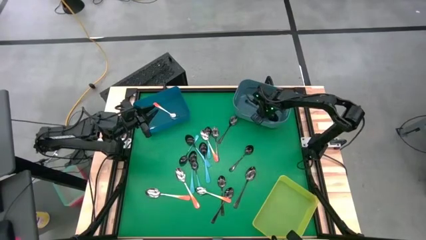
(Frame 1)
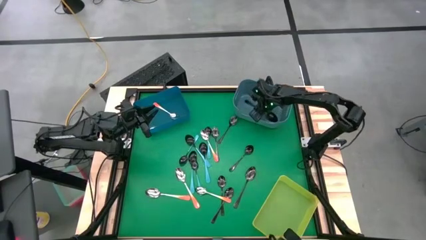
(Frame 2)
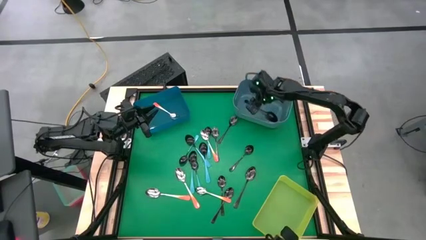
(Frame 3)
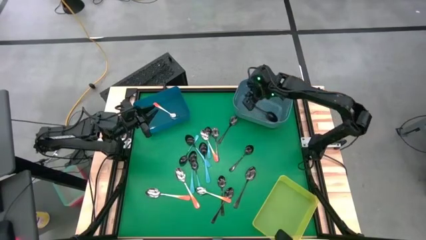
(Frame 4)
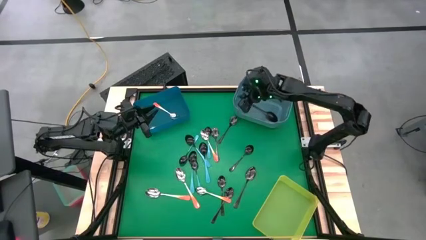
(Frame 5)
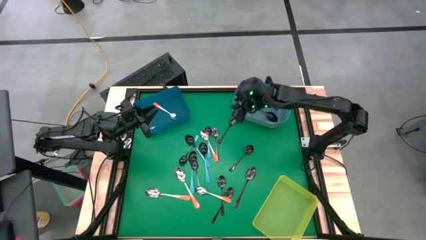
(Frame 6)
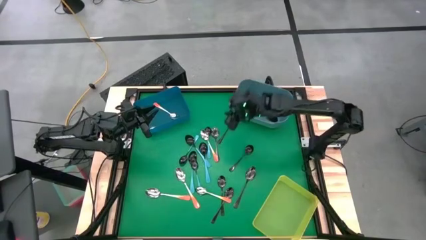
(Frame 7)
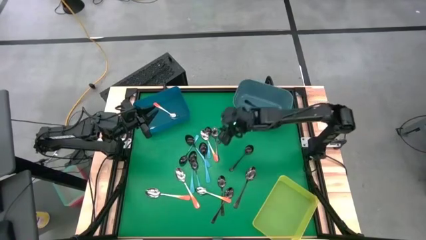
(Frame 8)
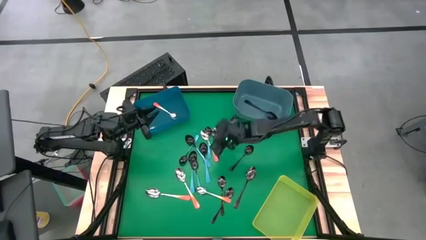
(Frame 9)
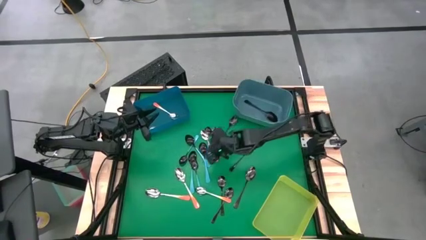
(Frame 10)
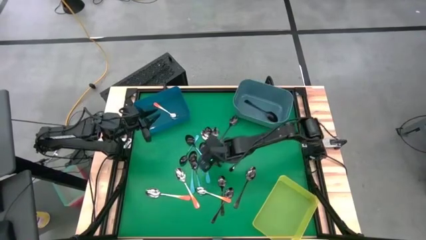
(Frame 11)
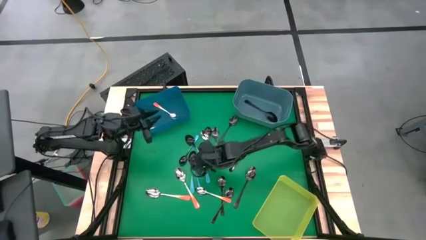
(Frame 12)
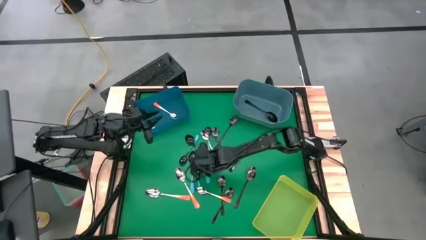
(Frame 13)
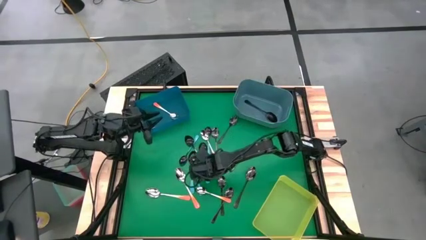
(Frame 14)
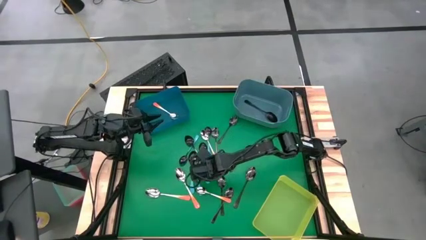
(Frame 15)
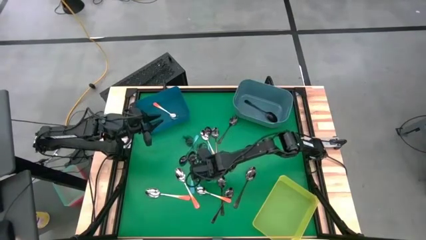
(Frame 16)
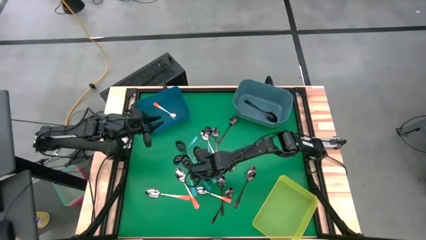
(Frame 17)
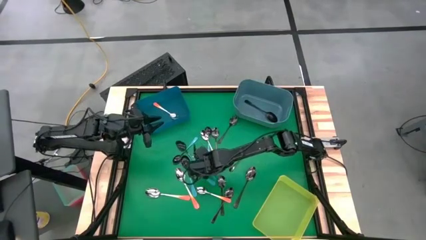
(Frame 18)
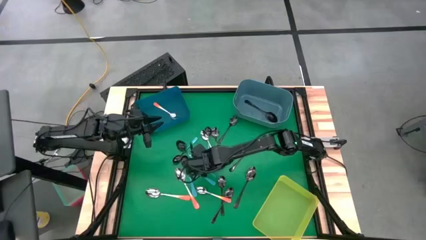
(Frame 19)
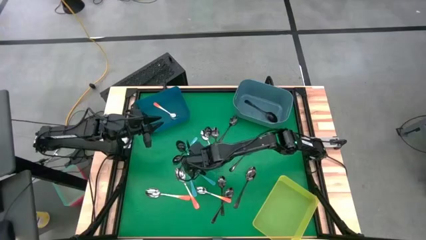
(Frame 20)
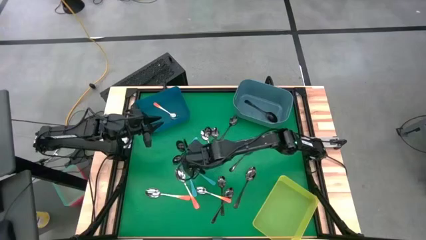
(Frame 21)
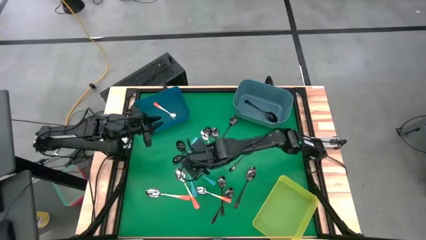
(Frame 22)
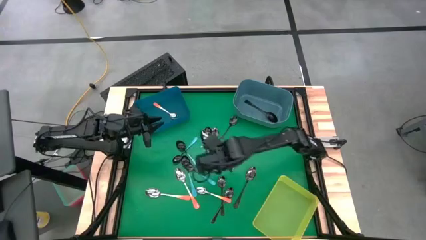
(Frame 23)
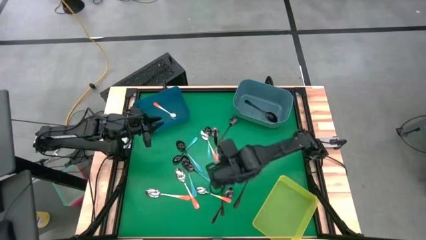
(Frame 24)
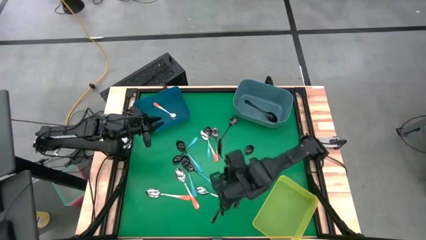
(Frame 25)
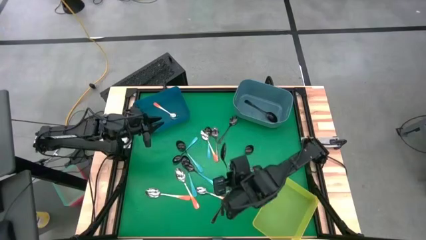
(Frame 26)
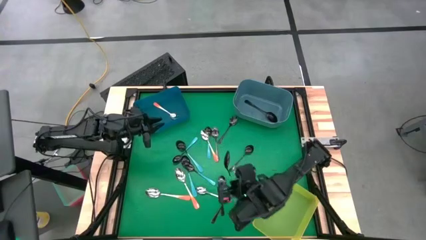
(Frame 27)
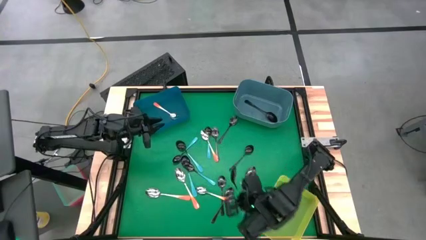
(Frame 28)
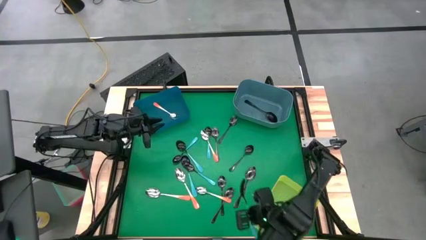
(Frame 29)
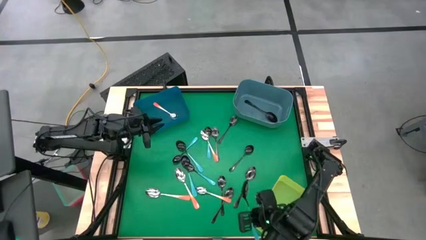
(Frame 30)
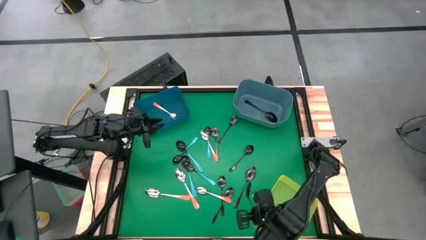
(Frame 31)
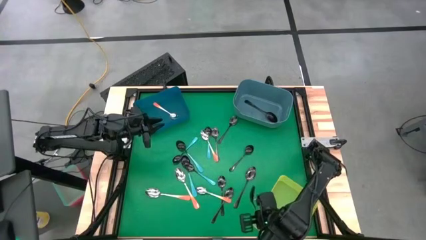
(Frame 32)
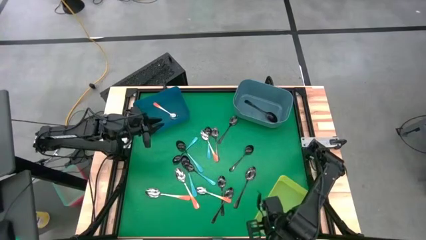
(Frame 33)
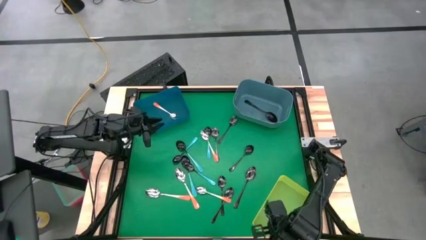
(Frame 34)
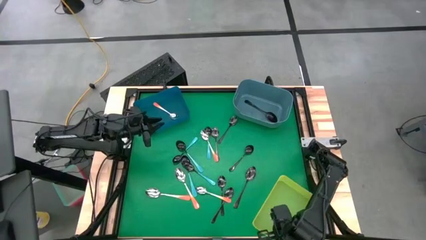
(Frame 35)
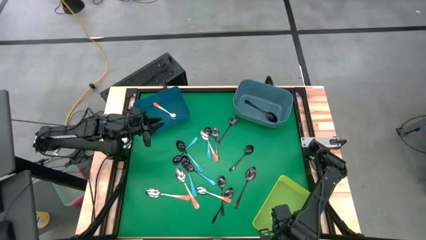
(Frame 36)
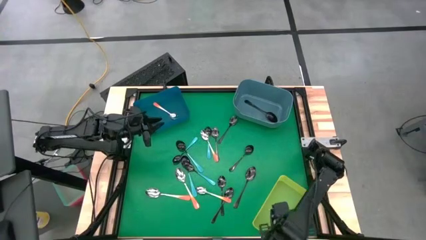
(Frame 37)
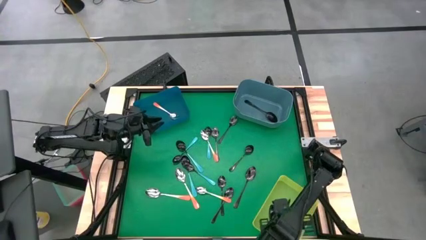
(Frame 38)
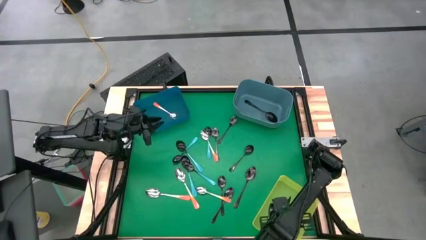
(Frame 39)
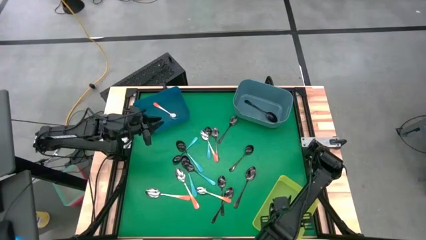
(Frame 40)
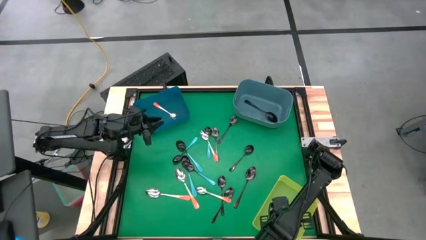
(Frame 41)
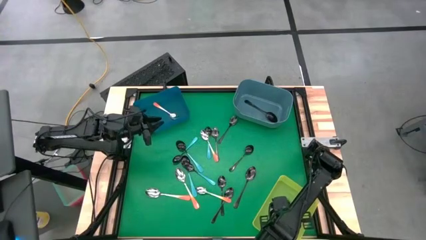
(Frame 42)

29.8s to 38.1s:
Task: Sort silverware by color (type)
Put the blue spoon into the yellow bin

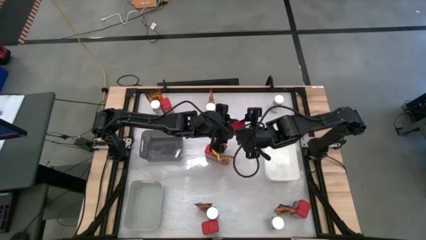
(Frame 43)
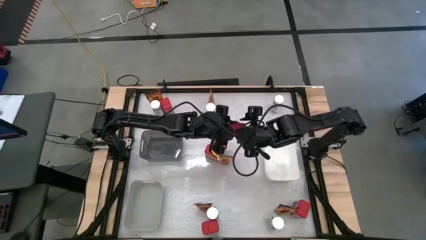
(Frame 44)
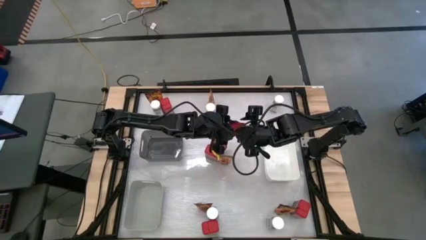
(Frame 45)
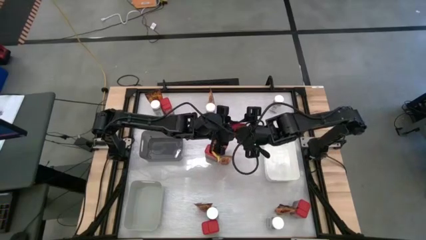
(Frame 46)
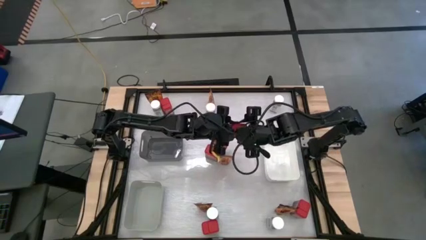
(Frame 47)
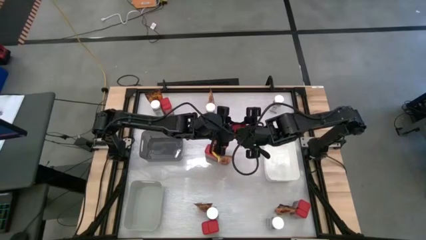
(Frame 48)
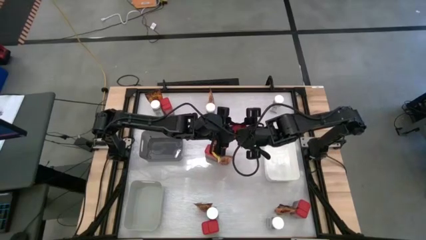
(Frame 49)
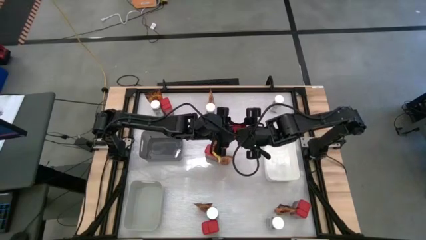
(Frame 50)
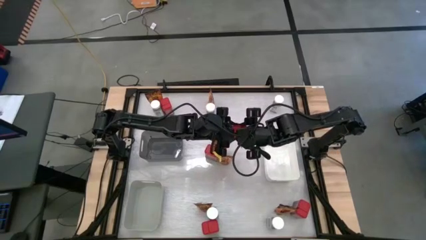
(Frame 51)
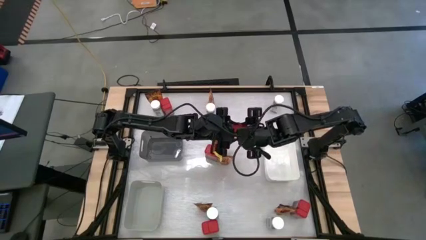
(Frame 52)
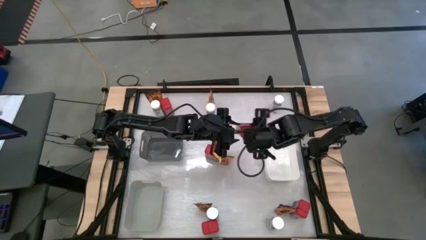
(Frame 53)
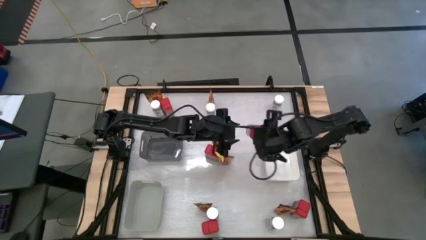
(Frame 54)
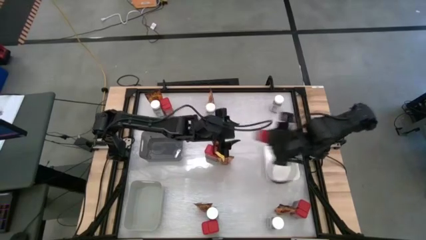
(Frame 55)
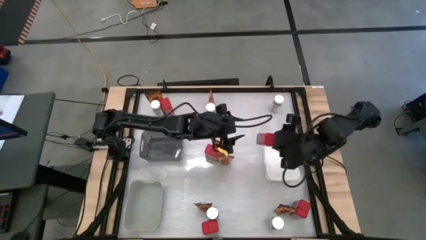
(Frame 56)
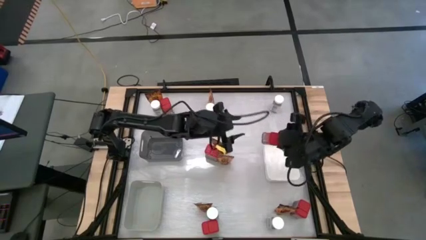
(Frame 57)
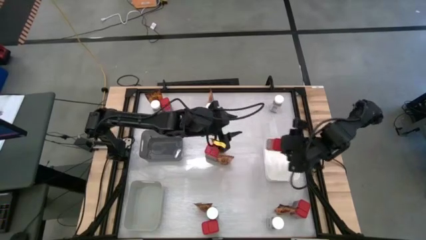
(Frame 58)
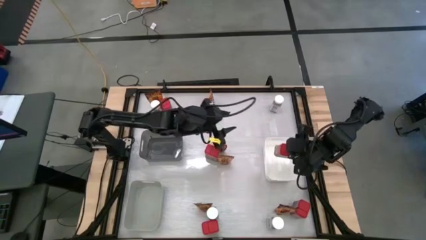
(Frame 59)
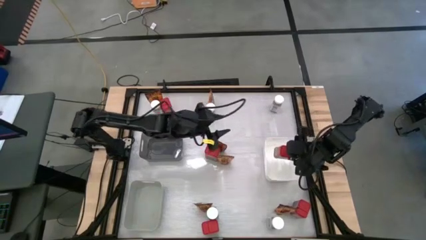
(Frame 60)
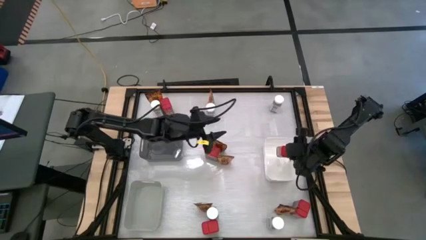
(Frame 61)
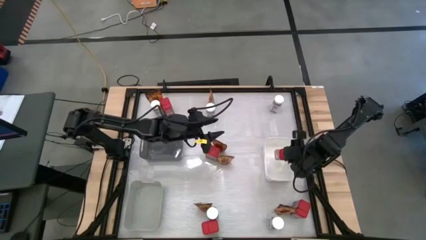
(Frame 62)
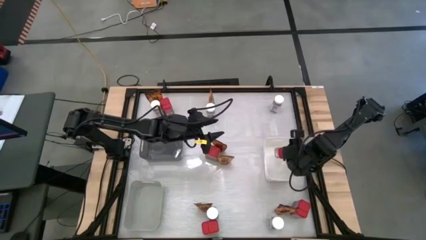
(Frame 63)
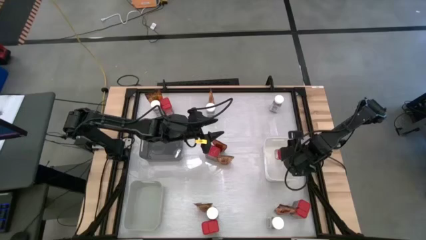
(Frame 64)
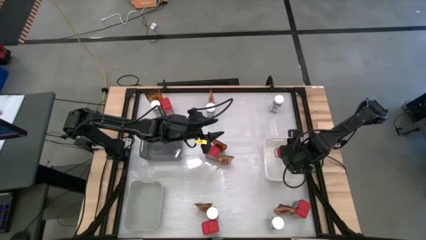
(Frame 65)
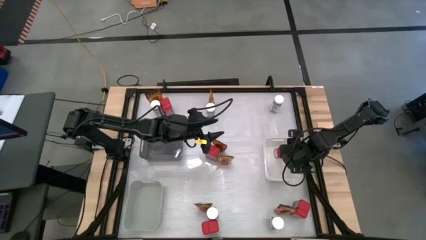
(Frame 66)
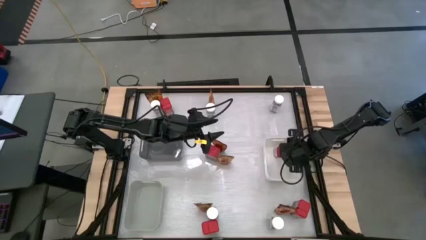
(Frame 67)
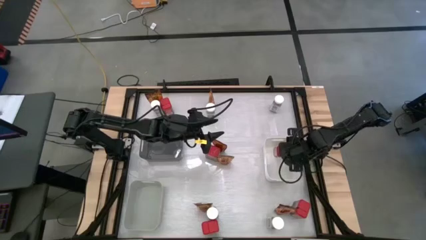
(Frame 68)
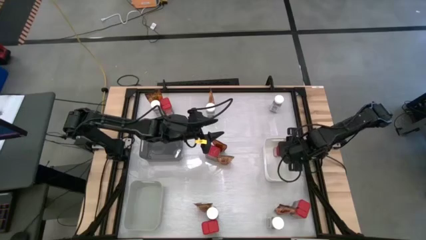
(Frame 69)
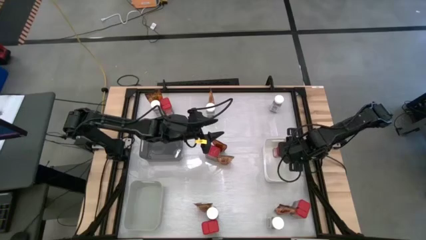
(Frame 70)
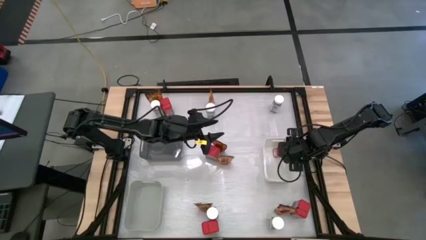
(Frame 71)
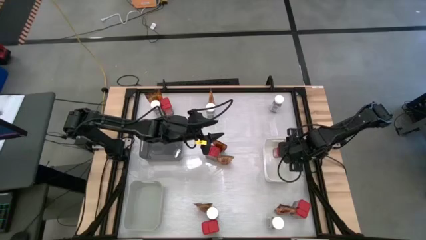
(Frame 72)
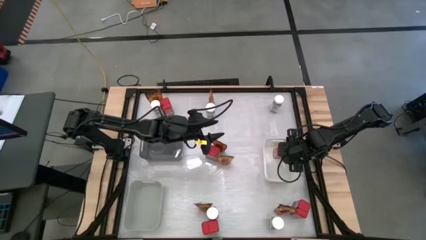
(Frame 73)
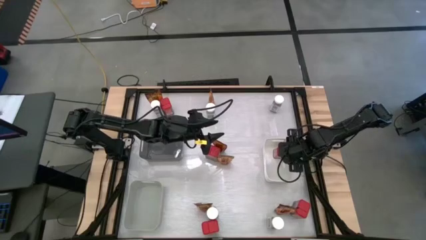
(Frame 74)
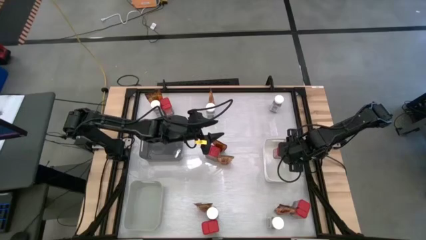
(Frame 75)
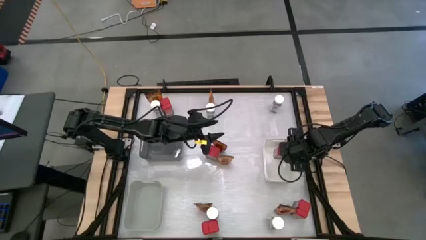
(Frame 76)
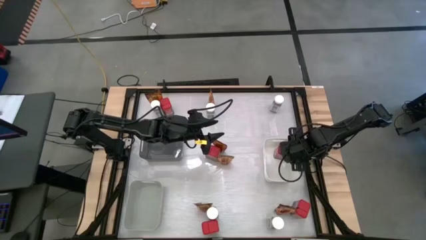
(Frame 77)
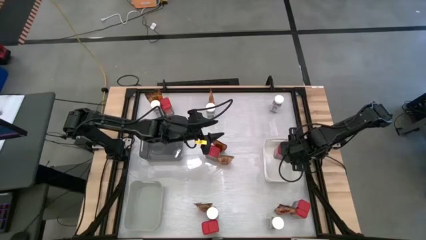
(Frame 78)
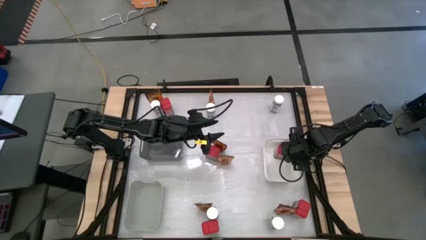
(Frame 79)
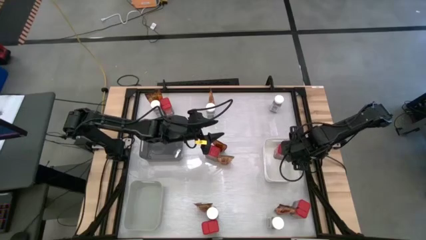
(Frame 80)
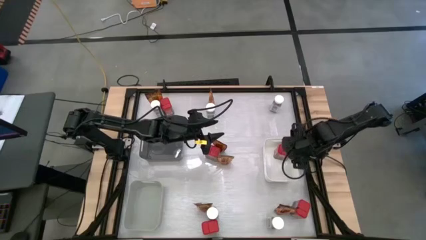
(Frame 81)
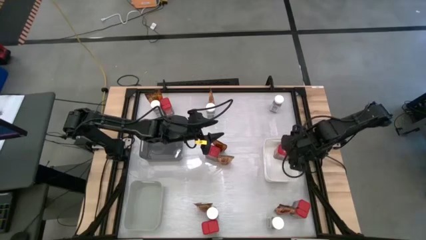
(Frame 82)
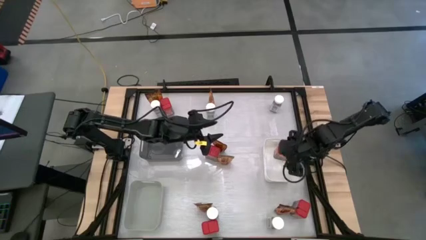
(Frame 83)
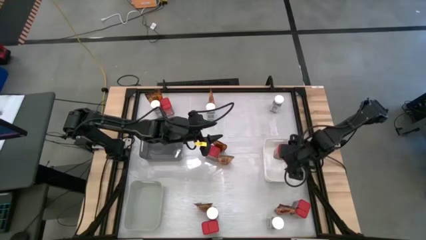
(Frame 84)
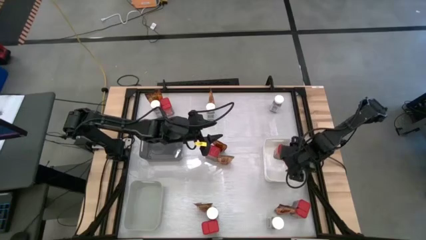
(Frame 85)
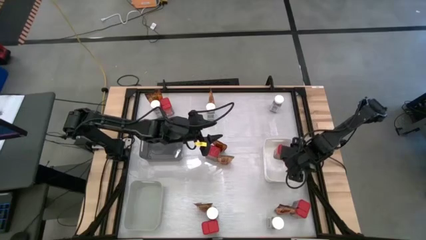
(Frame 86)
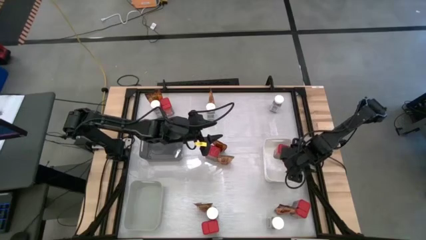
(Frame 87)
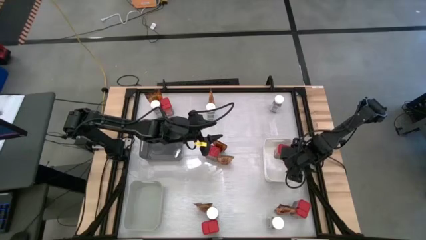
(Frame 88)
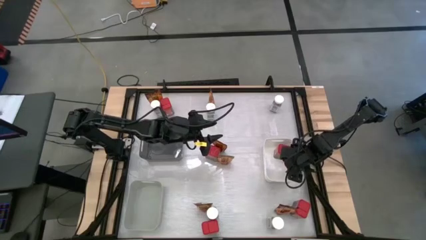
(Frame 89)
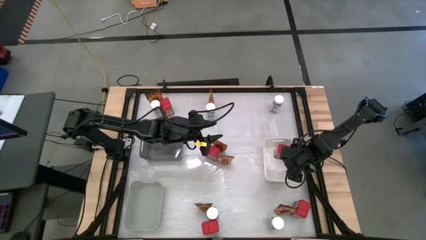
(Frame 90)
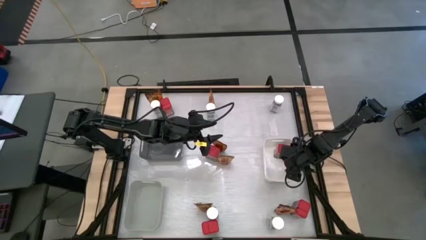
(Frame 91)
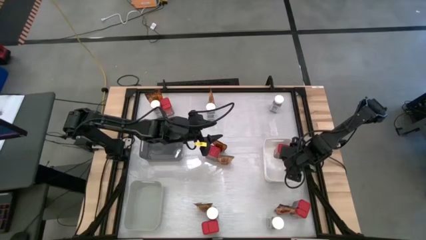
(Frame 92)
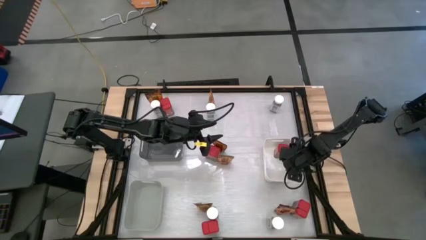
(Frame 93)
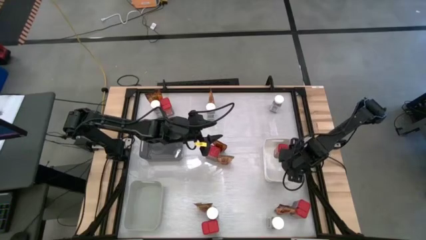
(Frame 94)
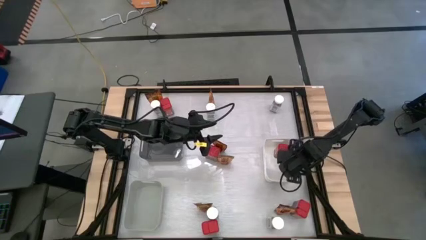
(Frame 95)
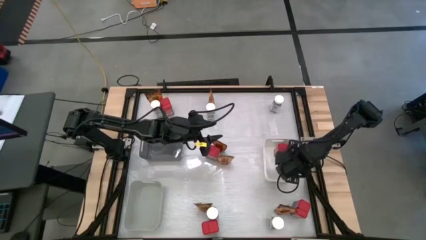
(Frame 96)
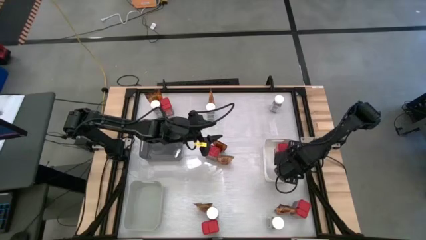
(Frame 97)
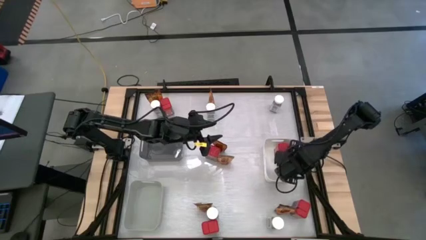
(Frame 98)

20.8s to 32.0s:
Task: Sort spices by type
Put the red spice can into the white bin
